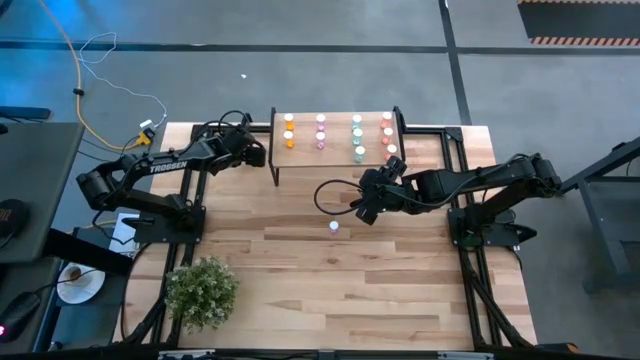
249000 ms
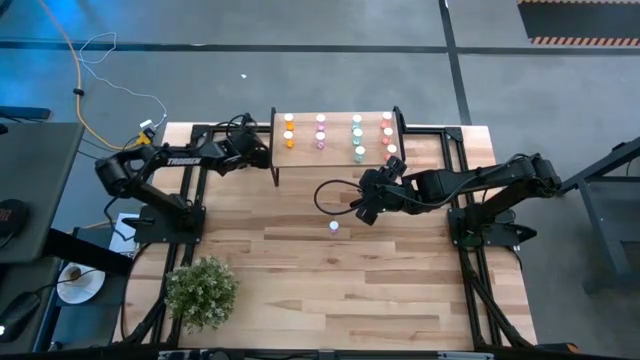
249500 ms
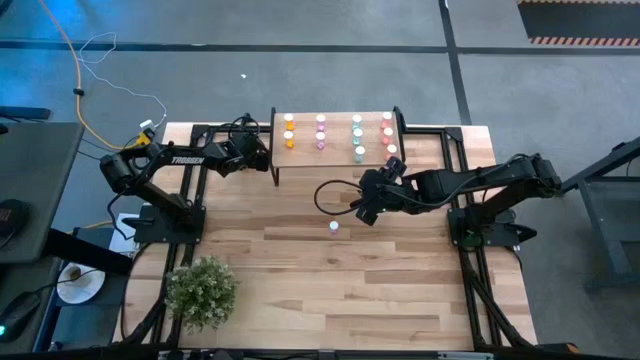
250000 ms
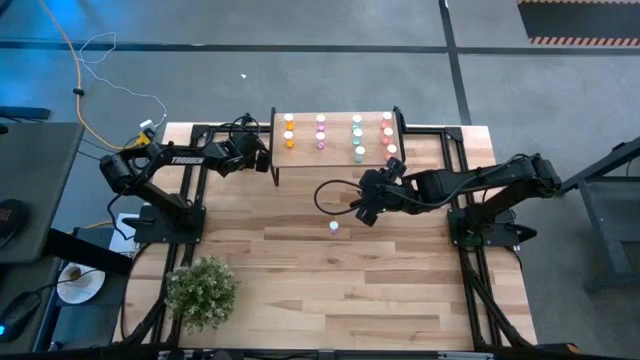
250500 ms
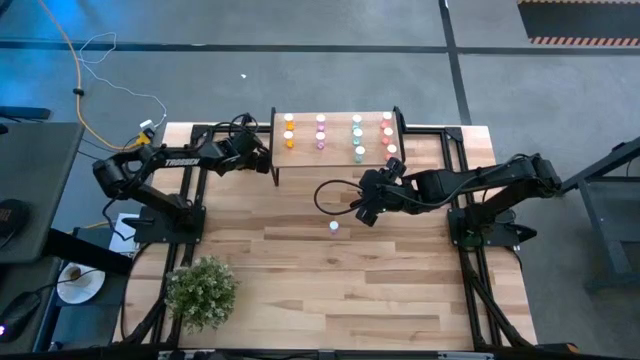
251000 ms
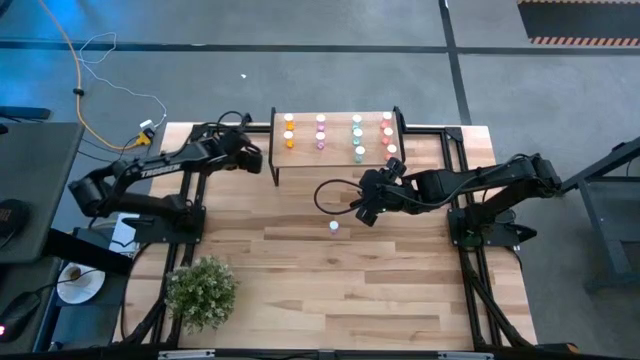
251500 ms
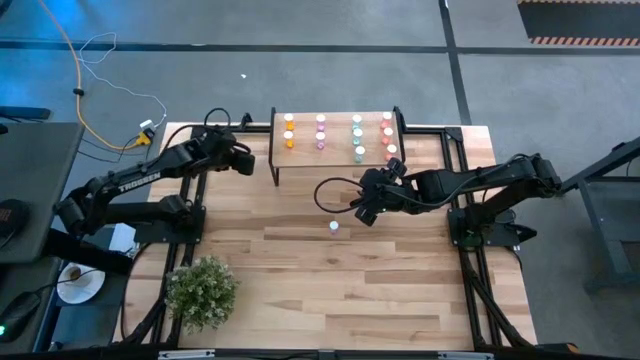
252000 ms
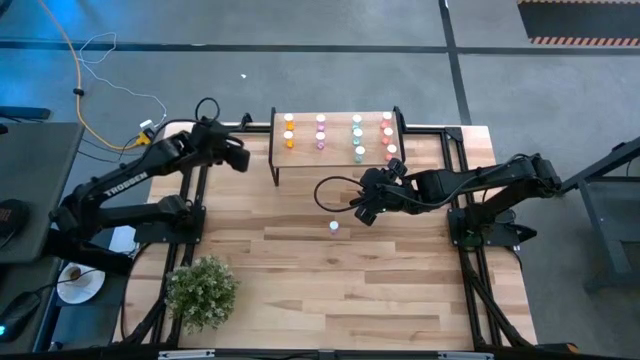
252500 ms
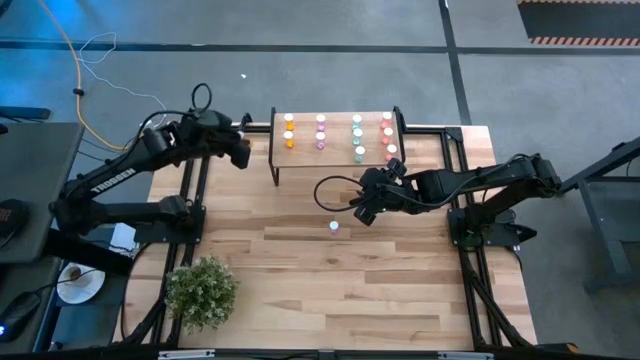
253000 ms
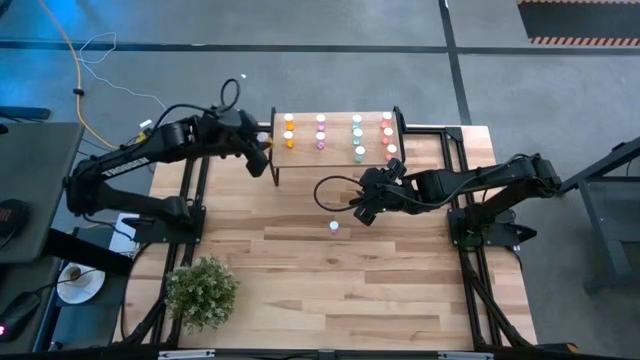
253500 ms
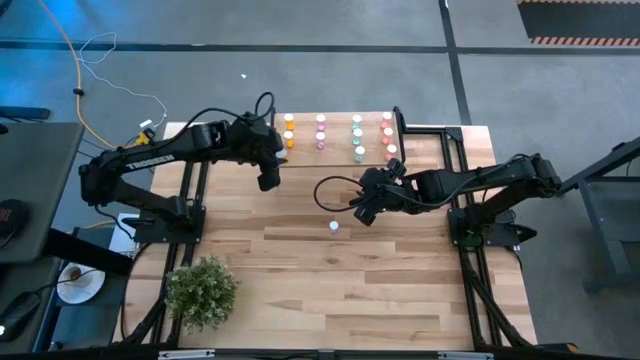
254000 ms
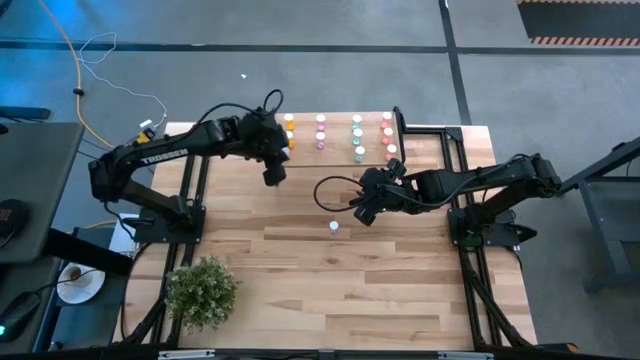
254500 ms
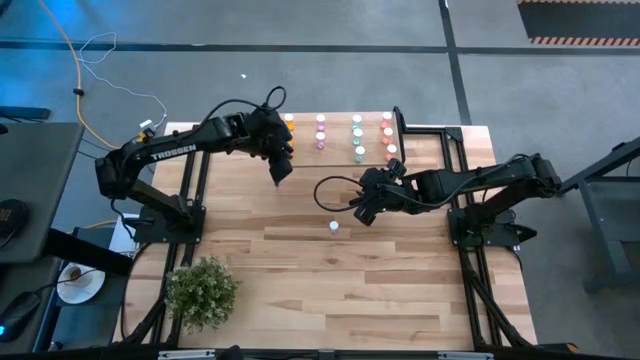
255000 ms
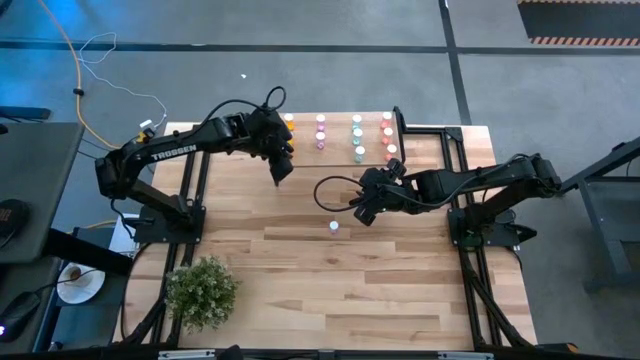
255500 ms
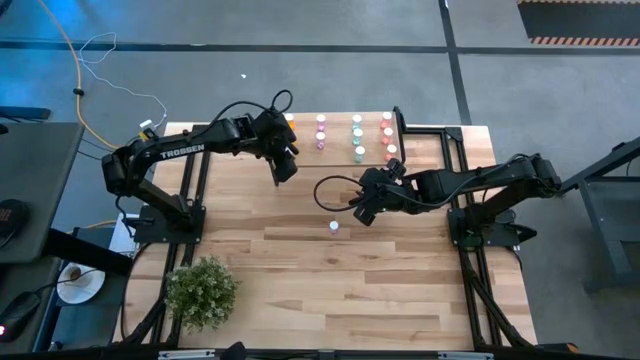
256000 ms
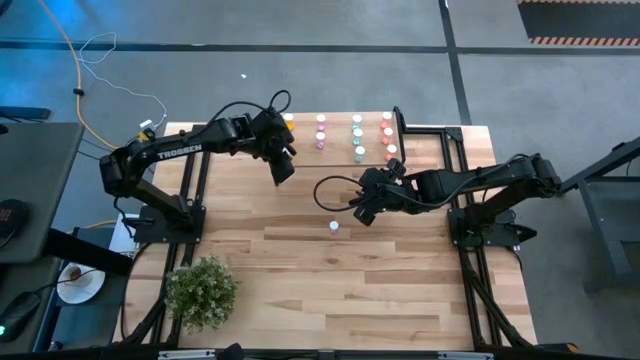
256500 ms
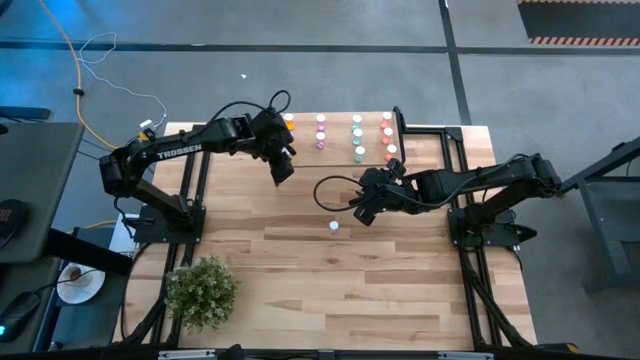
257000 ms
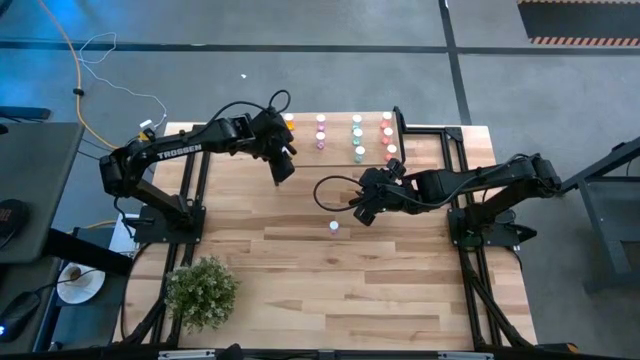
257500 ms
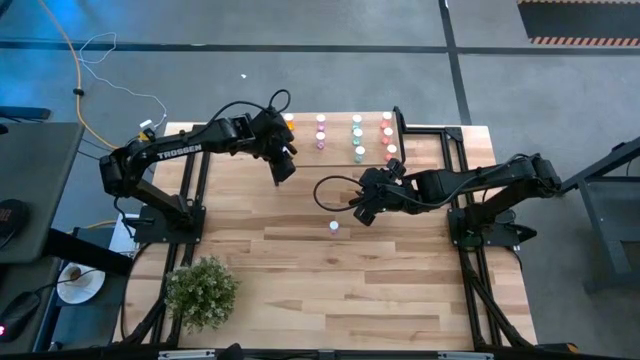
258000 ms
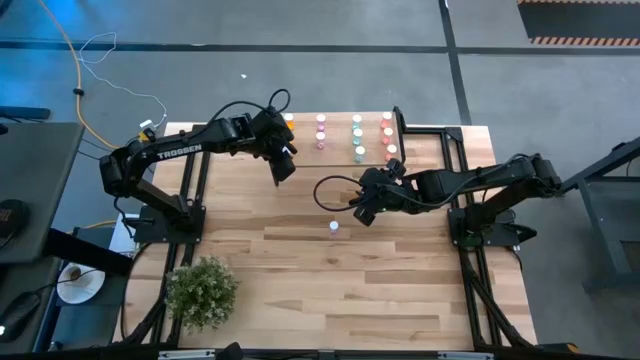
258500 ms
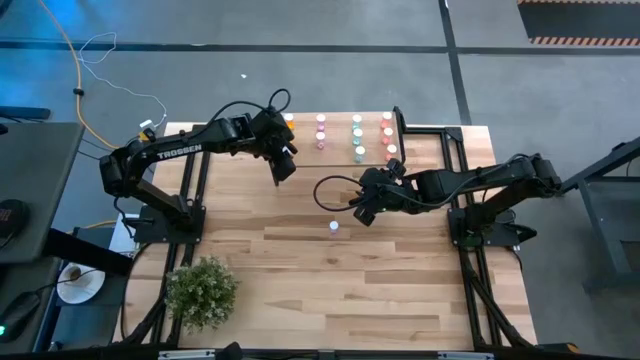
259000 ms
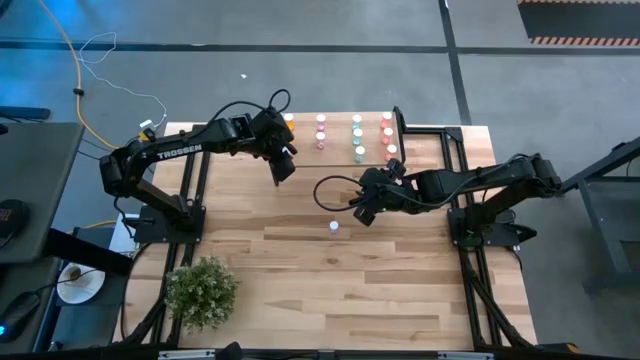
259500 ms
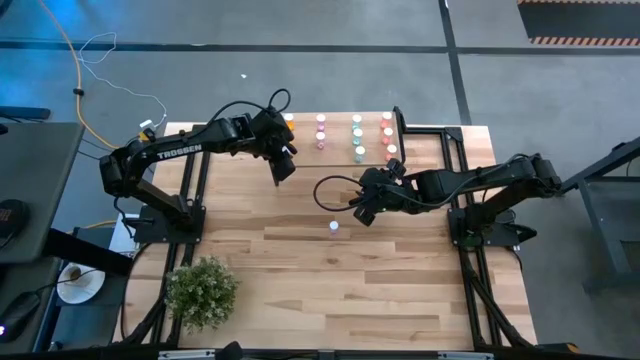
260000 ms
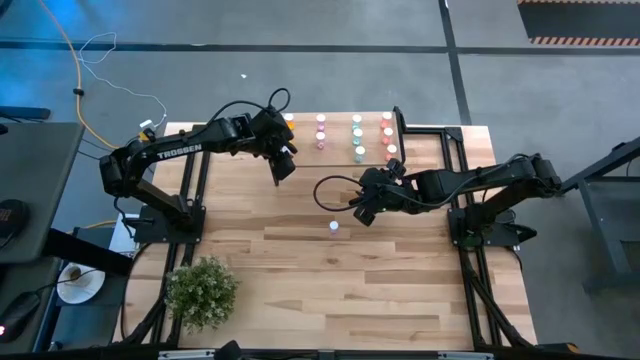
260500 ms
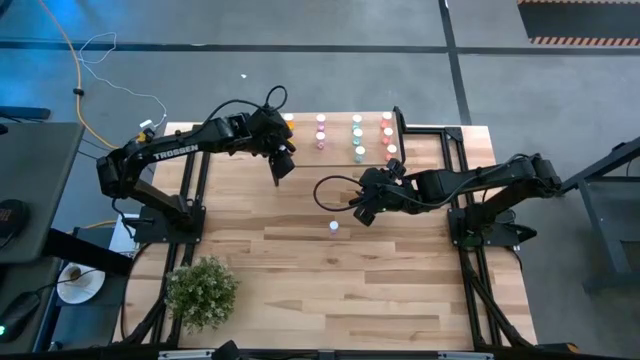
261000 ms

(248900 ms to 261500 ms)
Task: Pick and place medicine bottles onto shelf by color
Put the orange pill bottle on the shelf aligned with the other orange pill bottles

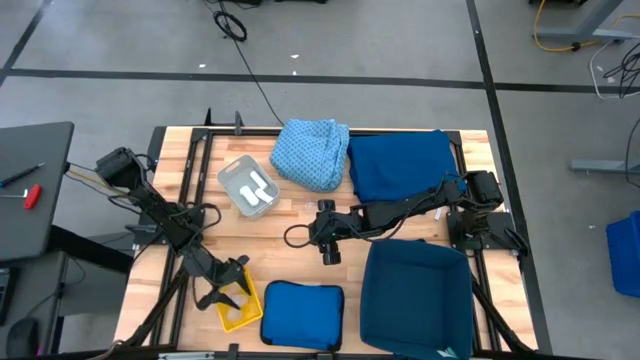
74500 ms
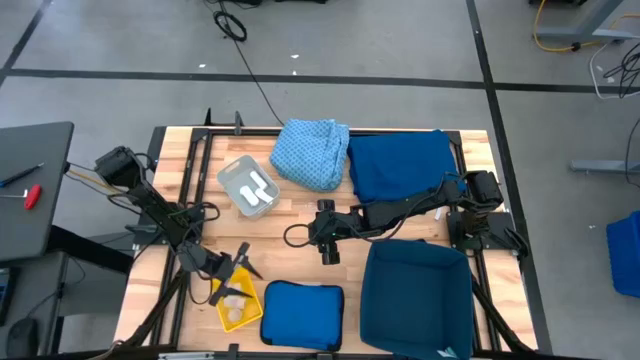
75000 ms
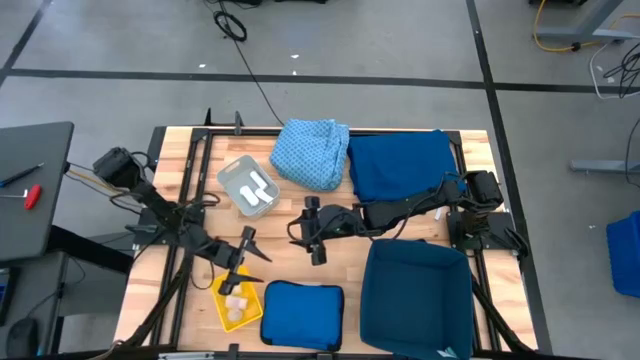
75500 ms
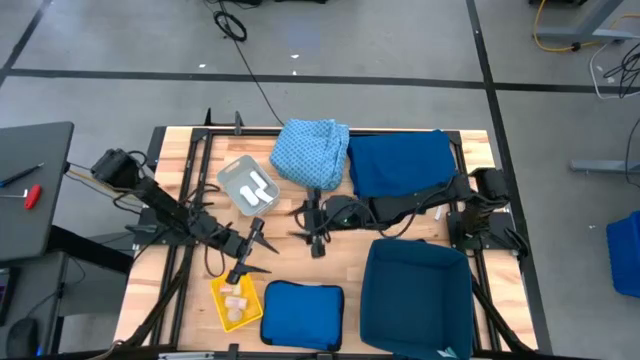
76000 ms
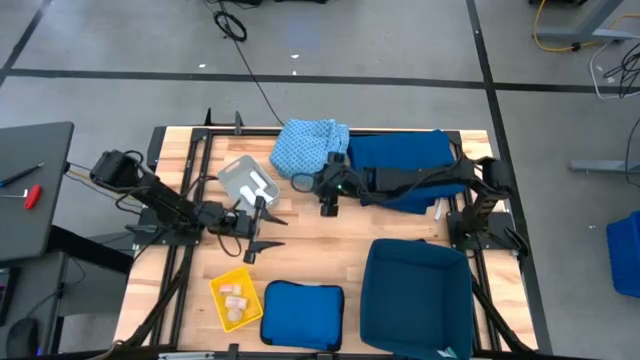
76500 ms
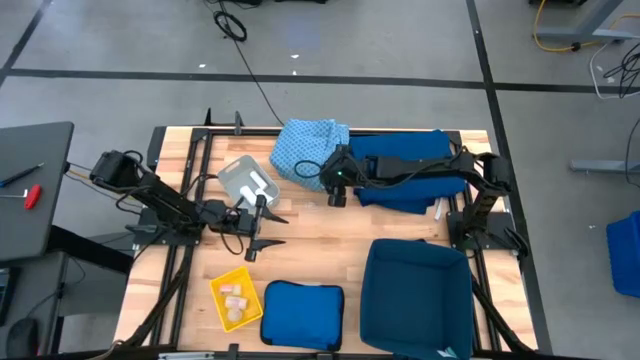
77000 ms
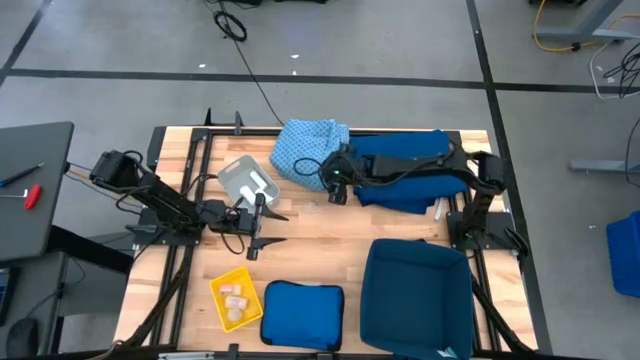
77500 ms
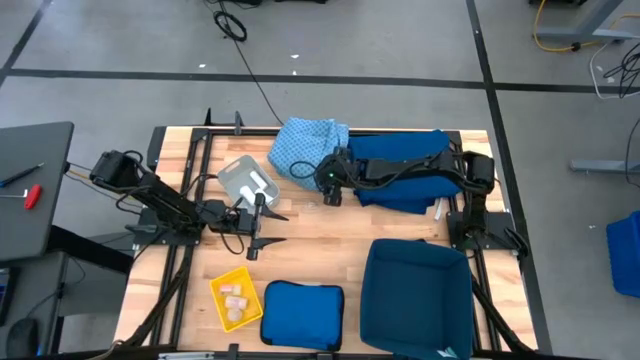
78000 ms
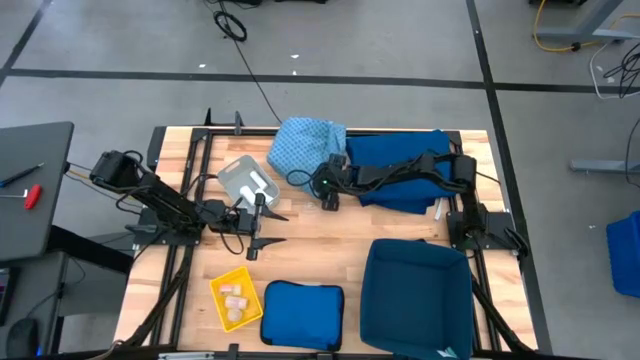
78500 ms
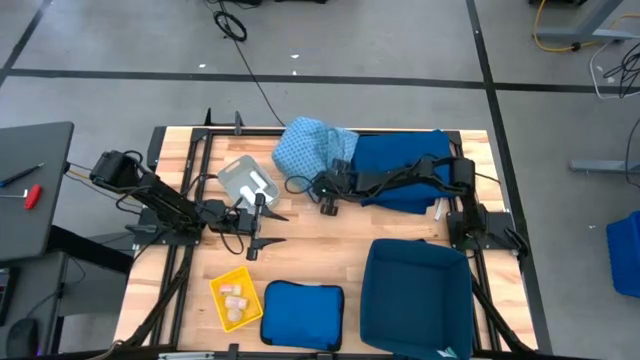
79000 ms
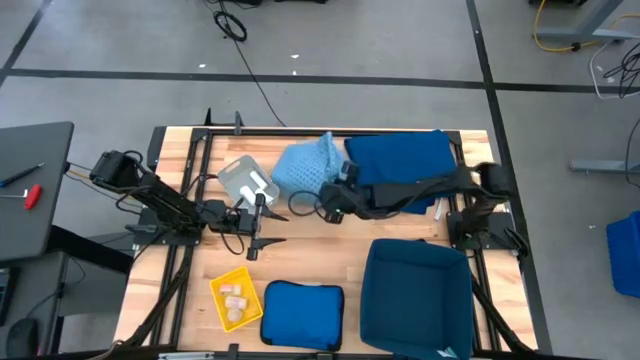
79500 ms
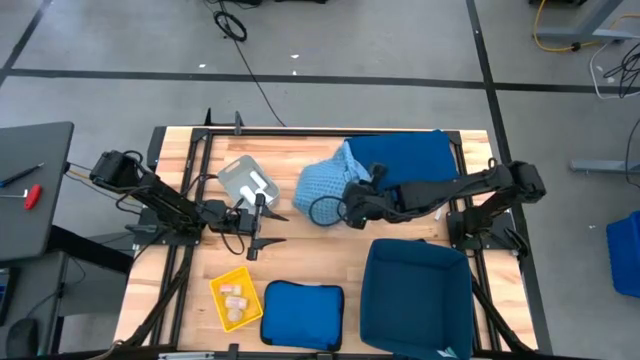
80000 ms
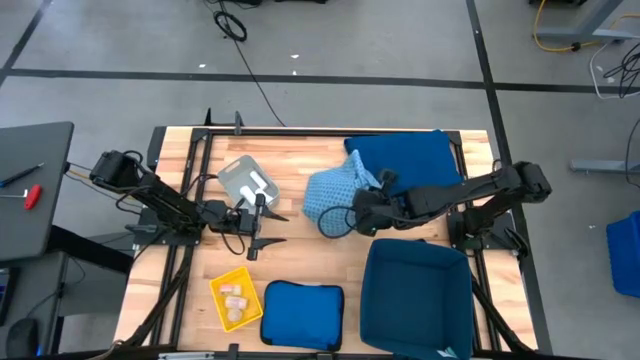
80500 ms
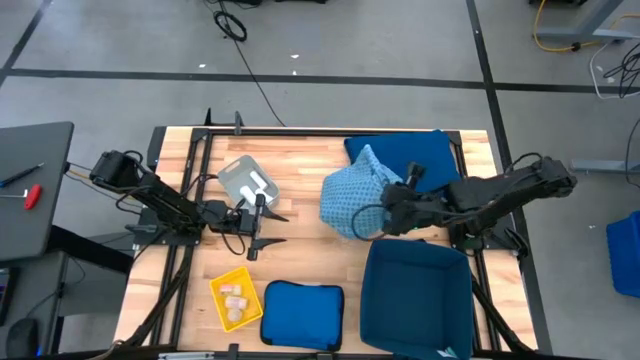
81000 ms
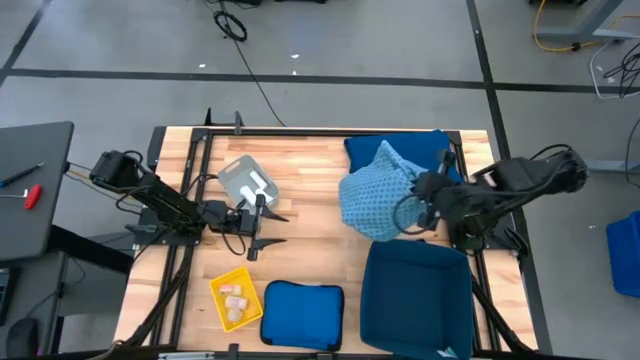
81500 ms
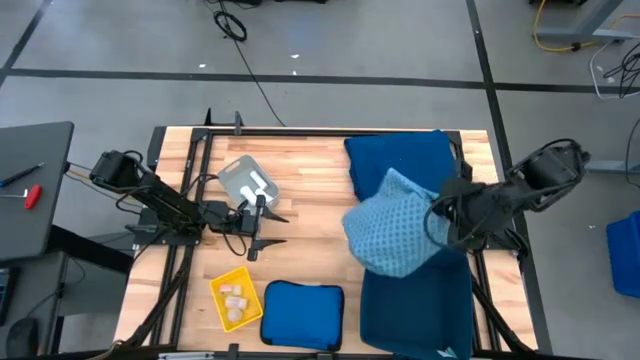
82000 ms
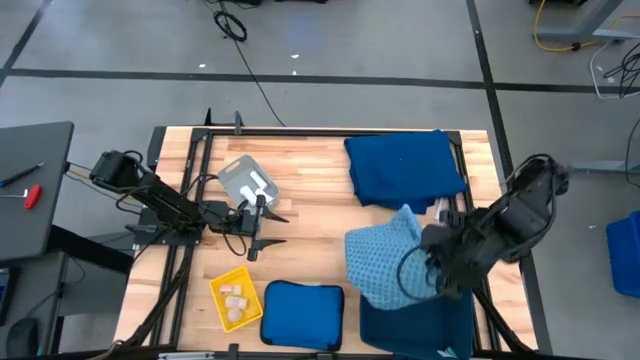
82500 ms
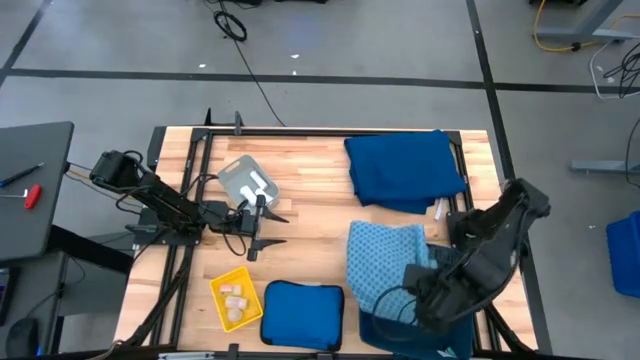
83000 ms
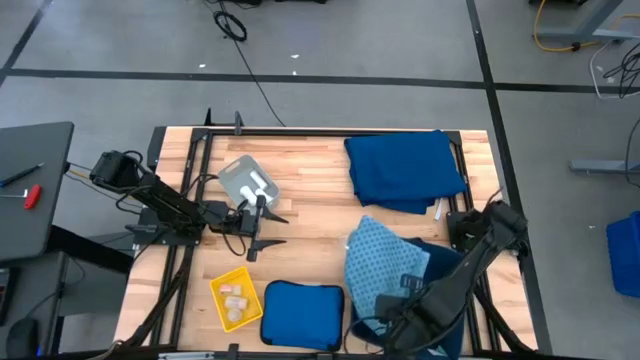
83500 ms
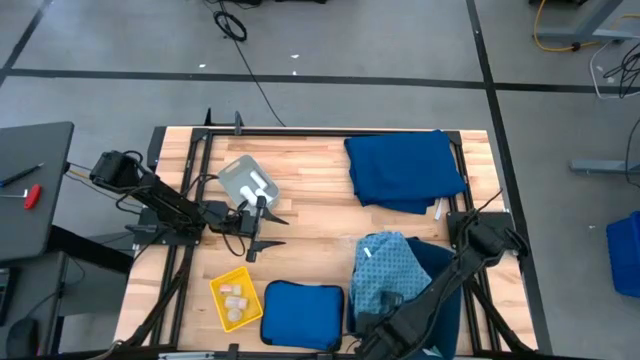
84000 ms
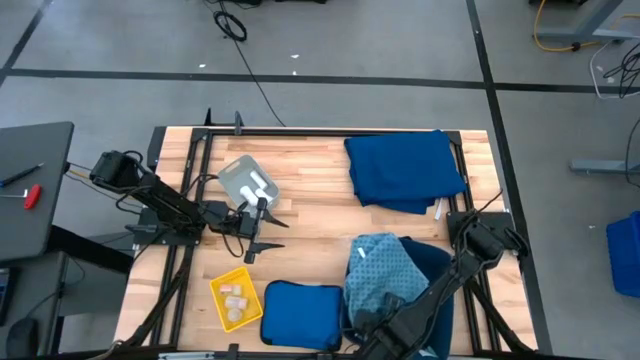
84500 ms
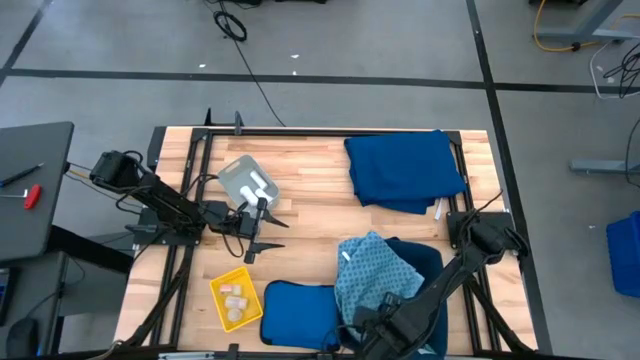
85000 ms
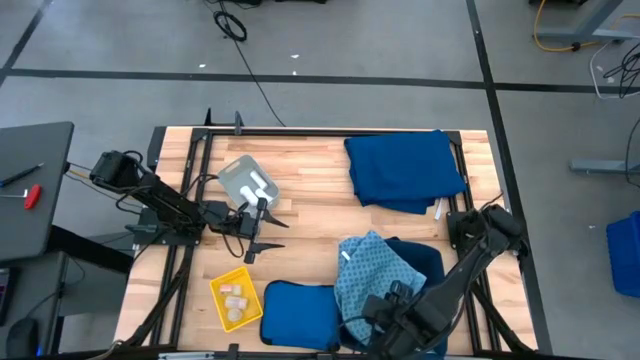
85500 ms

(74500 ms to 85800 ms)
Task: Pick & place medical supplies in basket/bin
Put the light blue patient gown into the blue laundry bin
